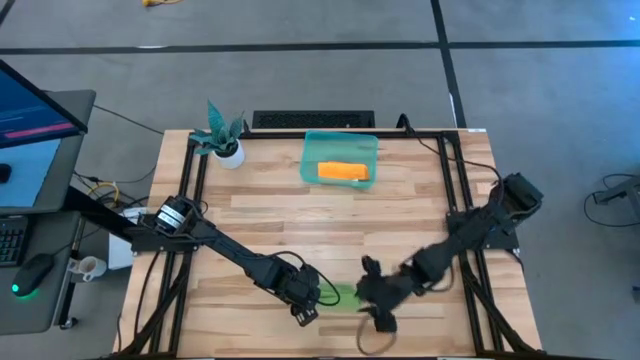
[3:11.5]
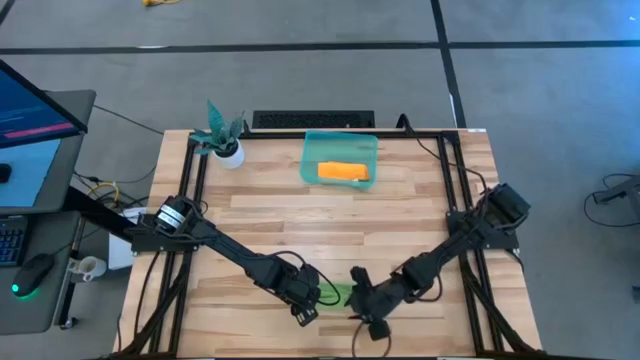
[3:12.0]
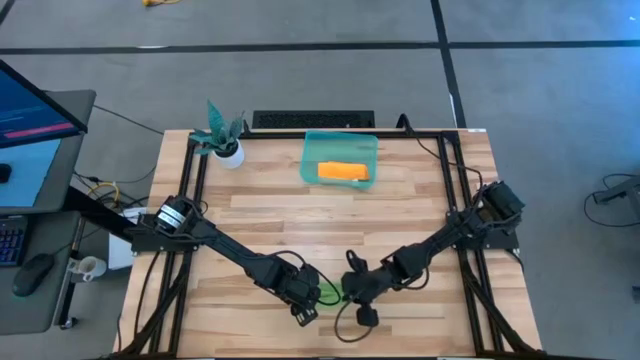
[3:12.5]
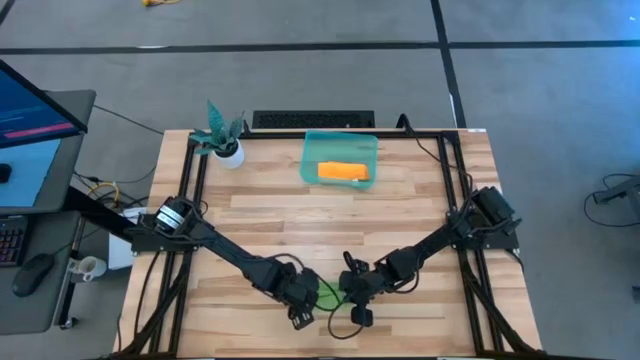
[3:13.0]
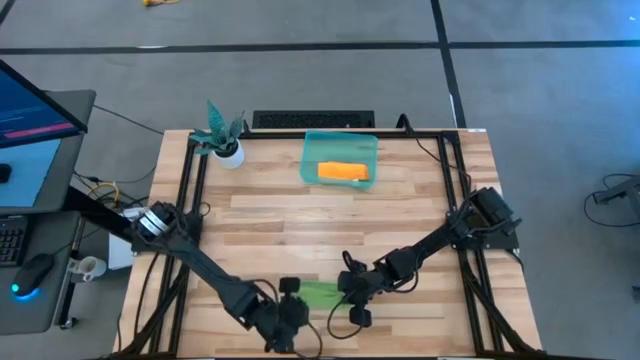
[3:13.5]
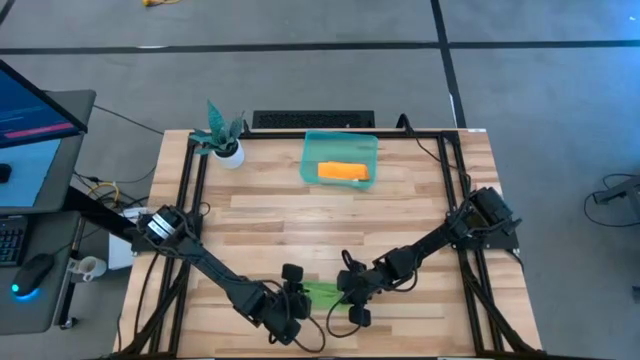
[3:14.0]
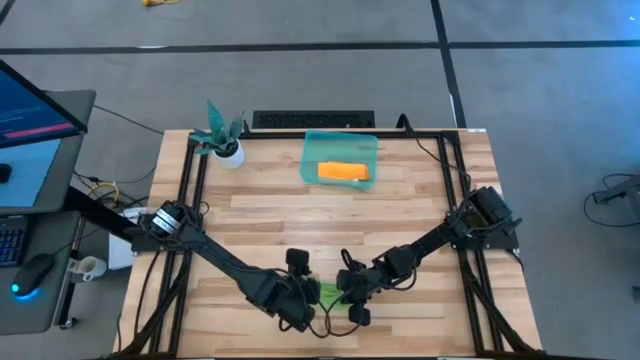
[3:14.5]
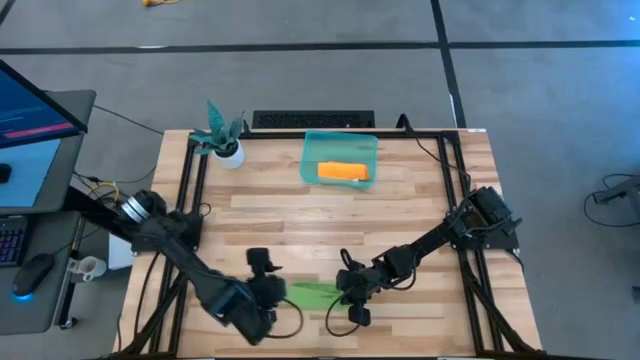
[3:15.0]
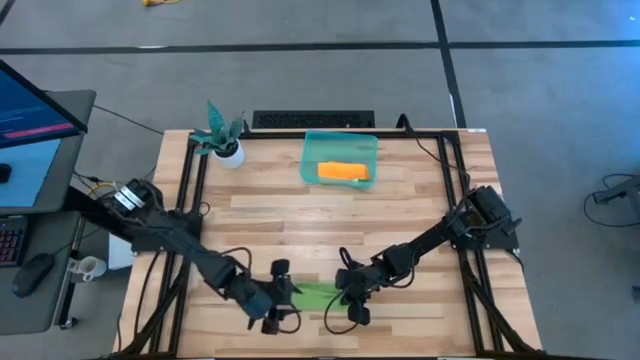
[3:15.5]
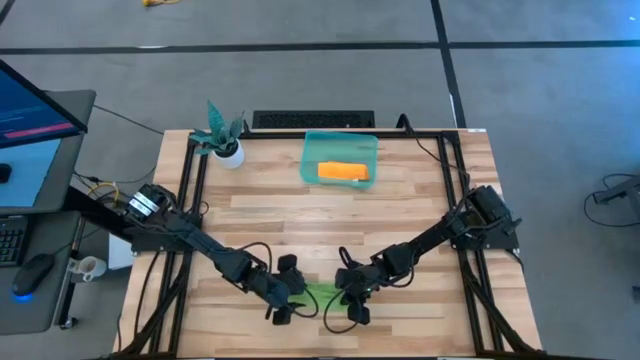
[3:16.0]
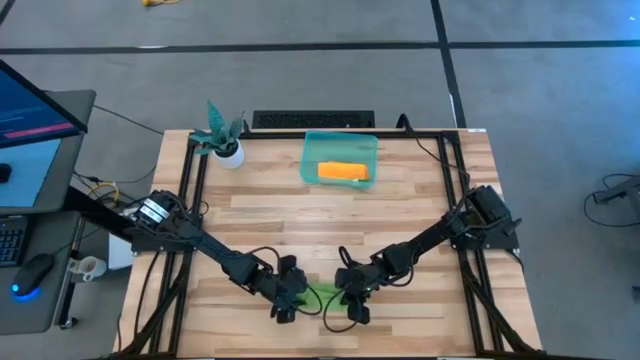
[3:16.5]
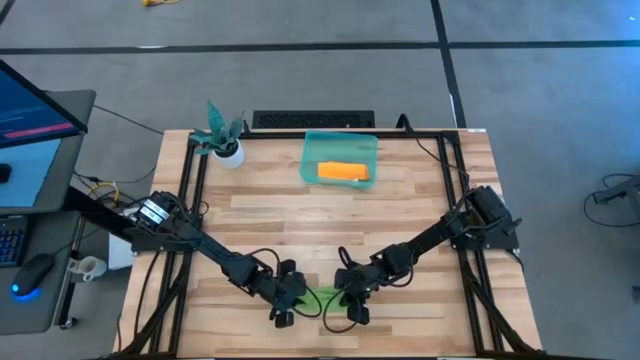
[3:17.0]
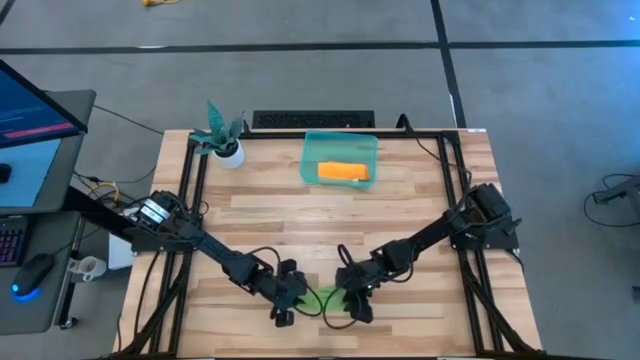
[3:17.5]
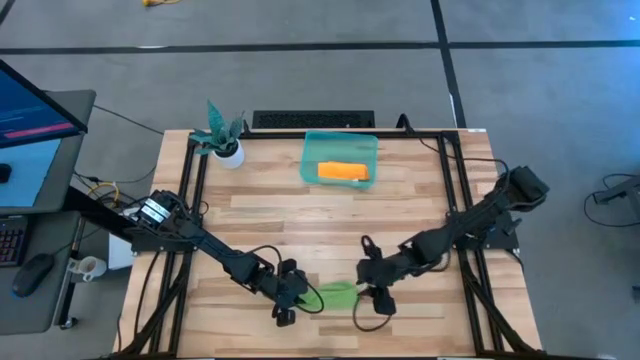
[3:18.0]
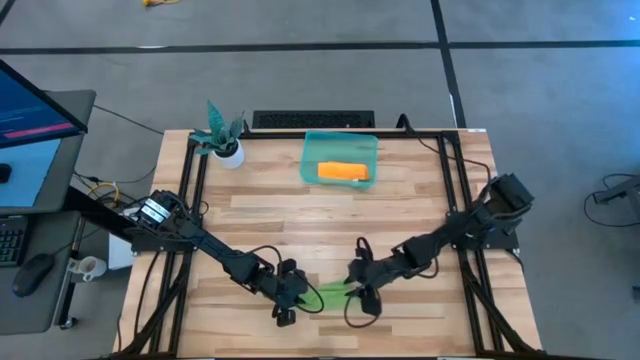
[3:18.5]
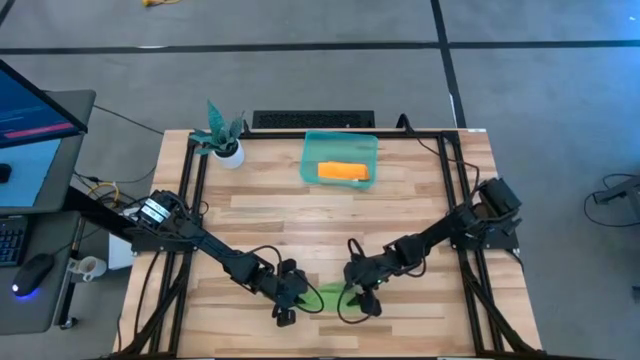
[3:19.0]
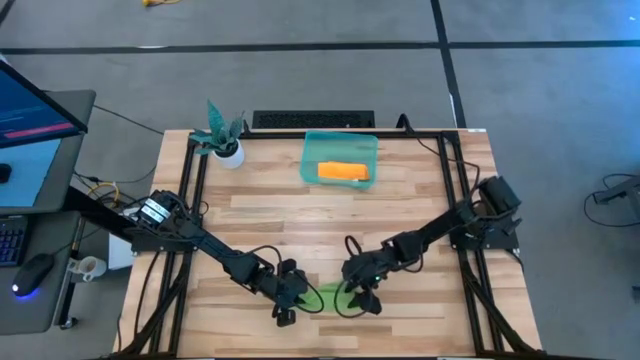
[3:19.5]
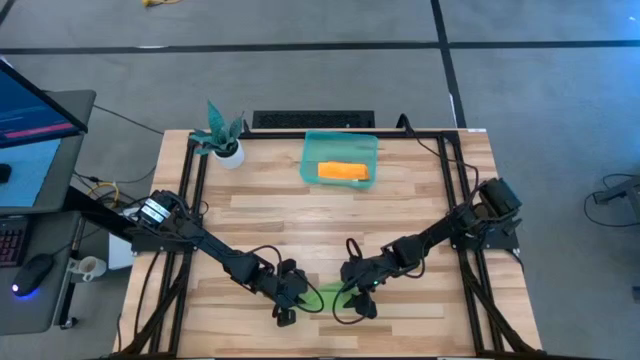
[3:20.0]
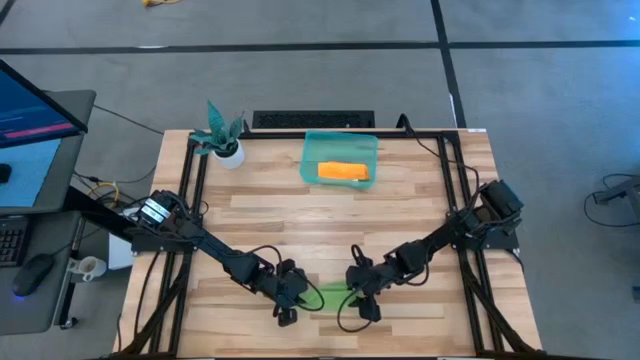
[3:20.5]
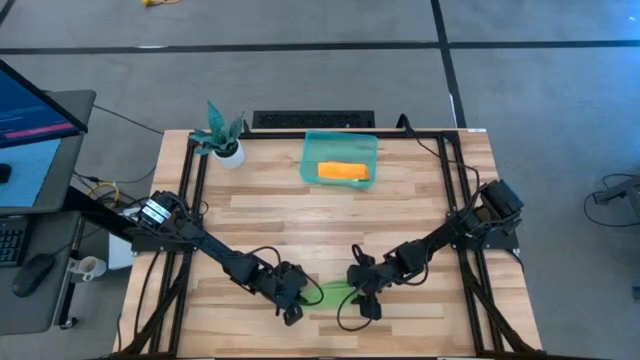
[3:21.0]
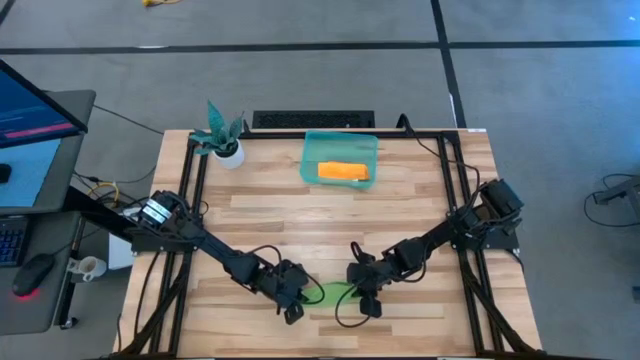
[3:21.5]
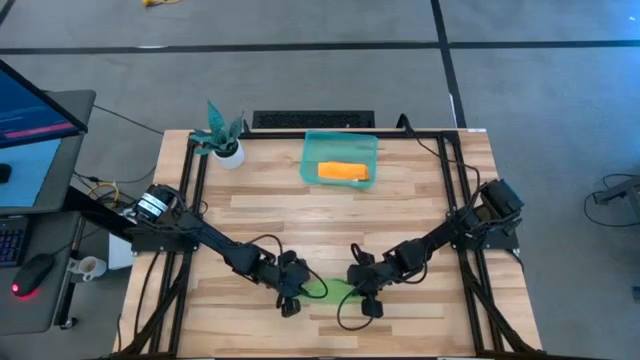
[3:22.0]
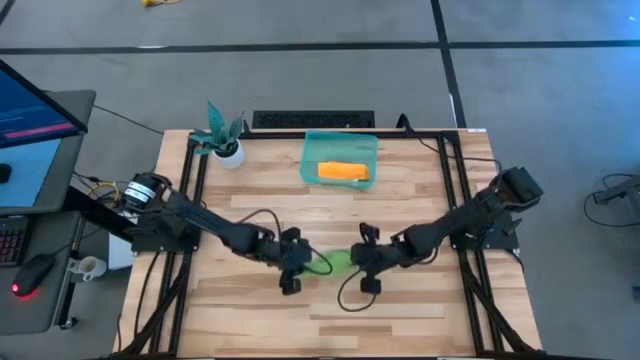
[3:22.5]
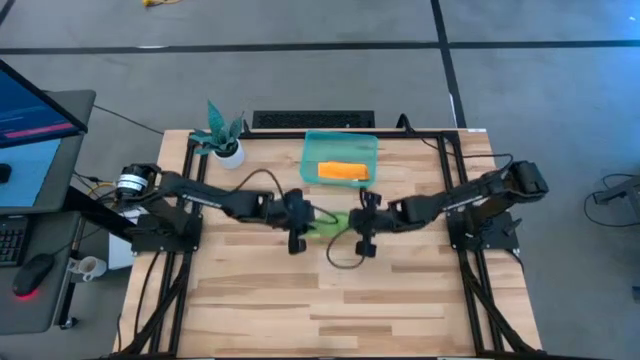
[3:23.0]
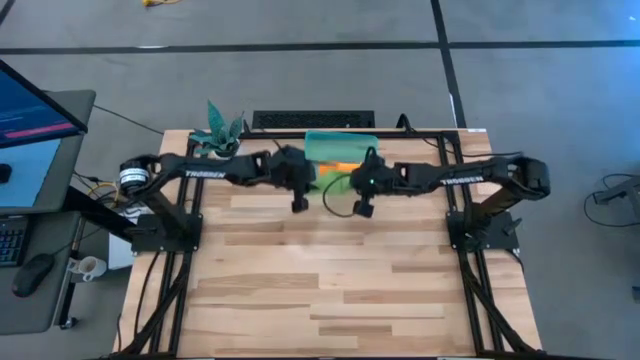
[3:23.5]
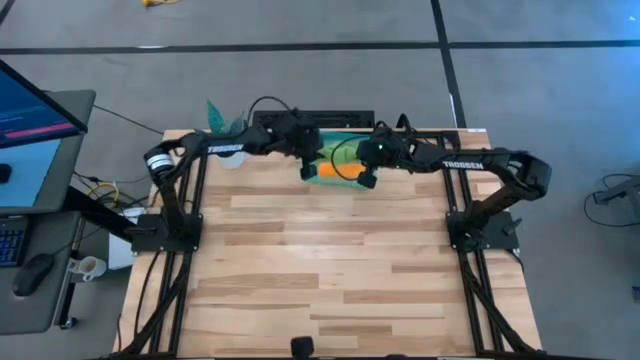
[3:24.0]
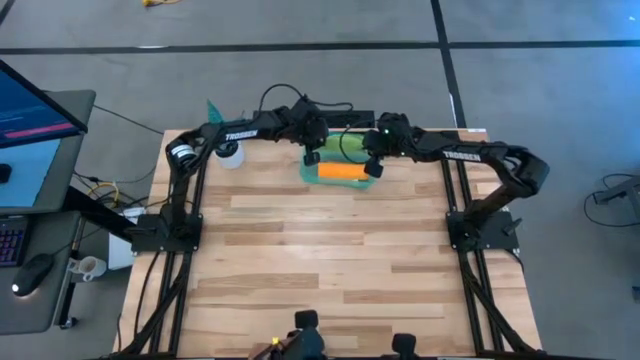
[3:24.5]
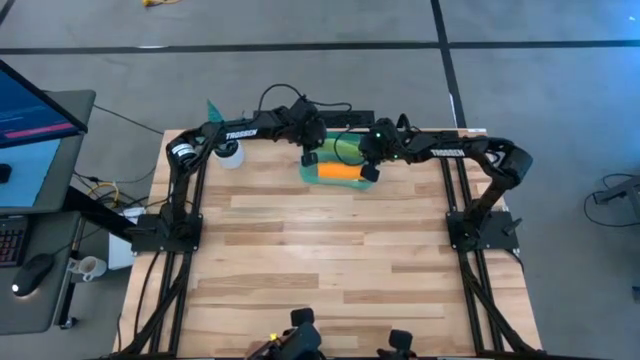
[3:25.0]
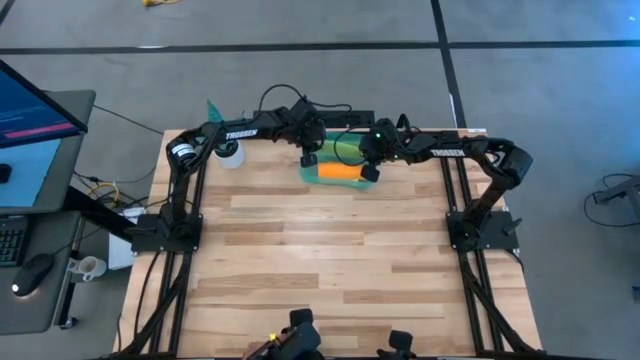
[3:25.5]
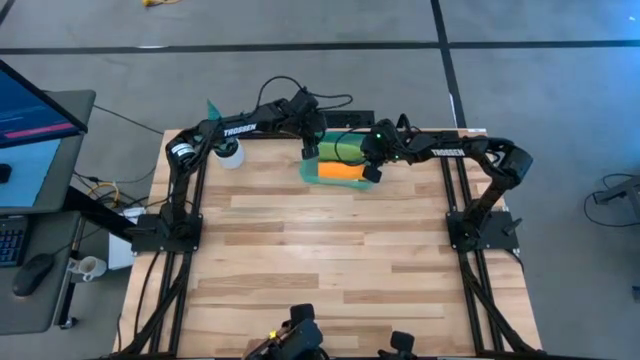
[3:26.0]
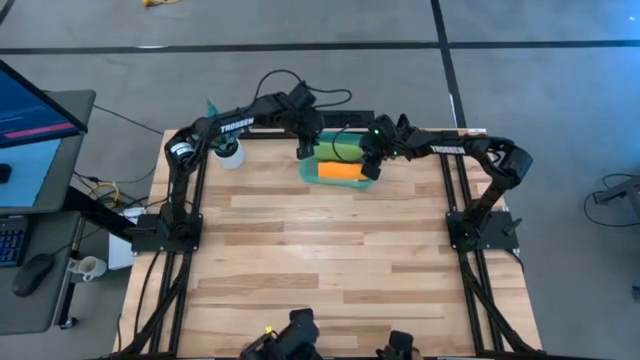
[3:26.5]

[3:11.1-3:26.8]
Task: Roll microfiber towels into tight, uniform cylinder then place into a basket
Put the green towel into the blue bin

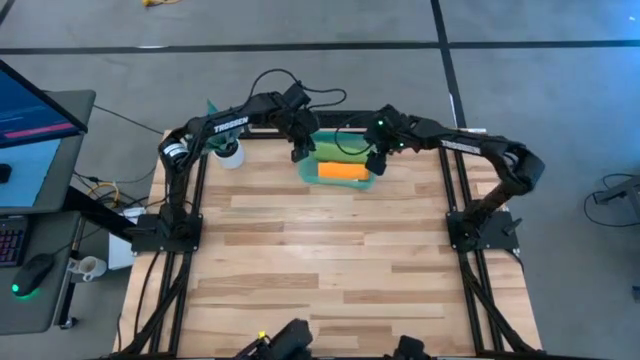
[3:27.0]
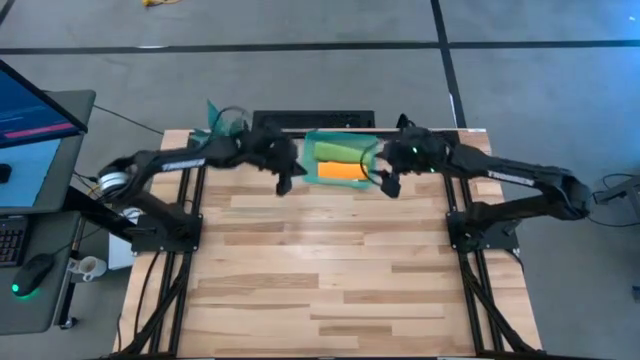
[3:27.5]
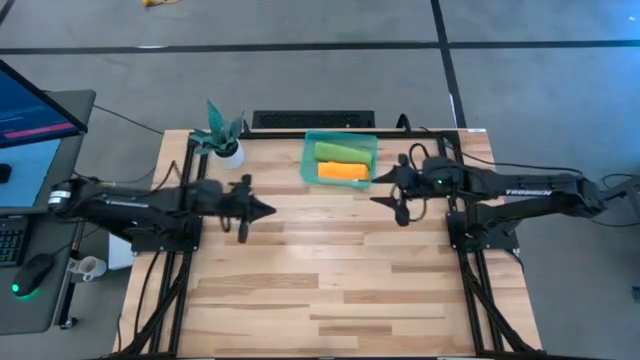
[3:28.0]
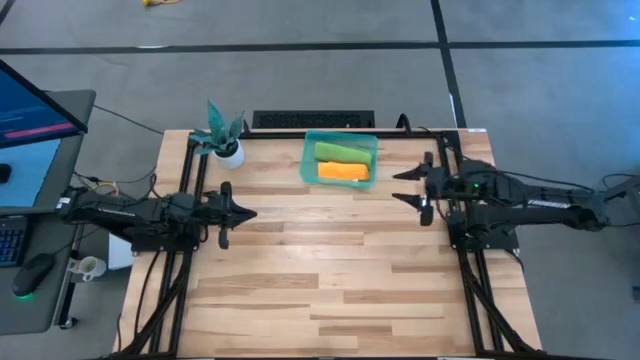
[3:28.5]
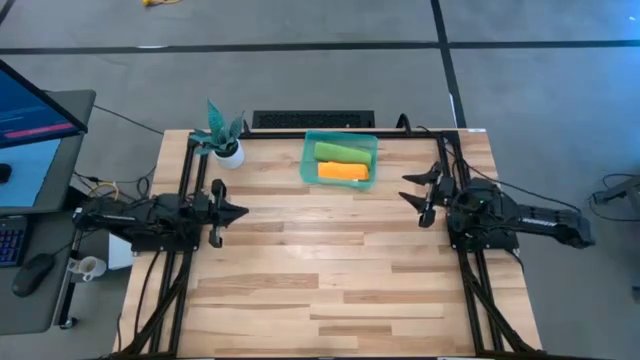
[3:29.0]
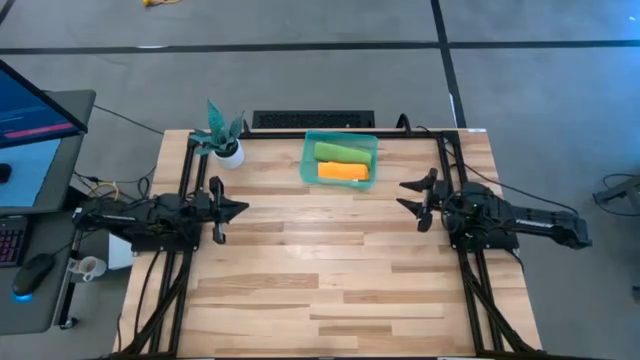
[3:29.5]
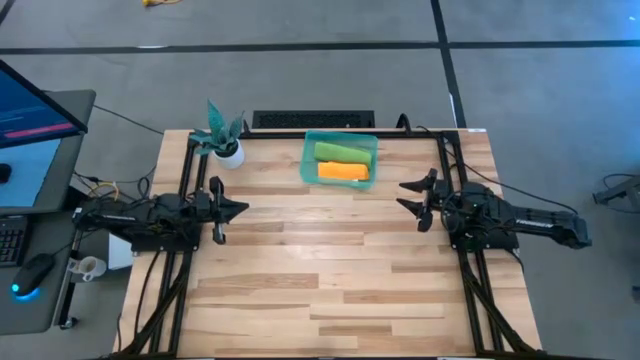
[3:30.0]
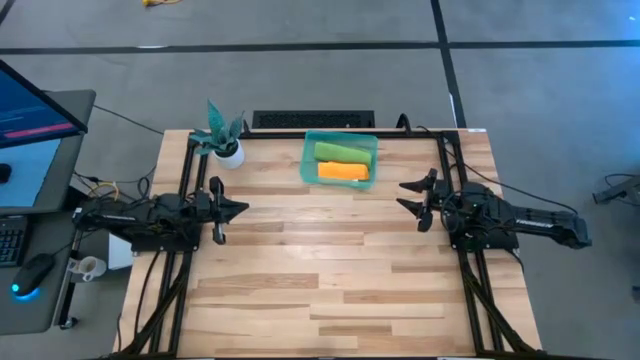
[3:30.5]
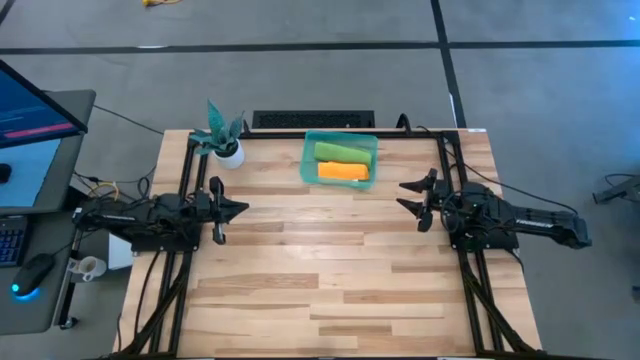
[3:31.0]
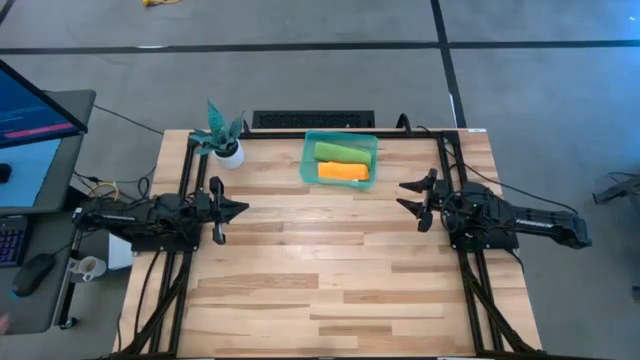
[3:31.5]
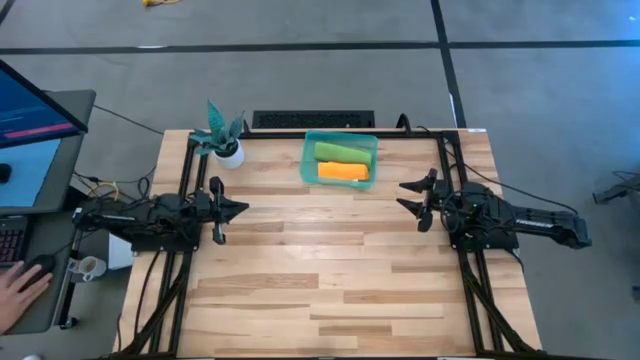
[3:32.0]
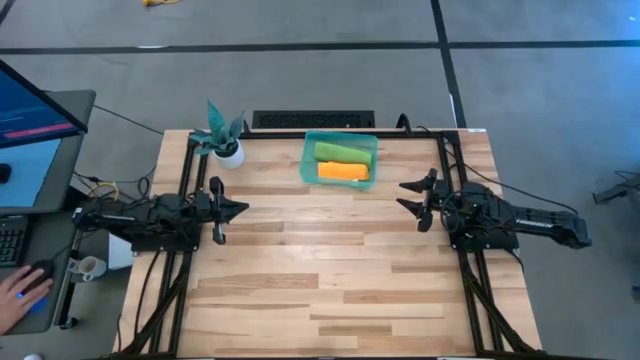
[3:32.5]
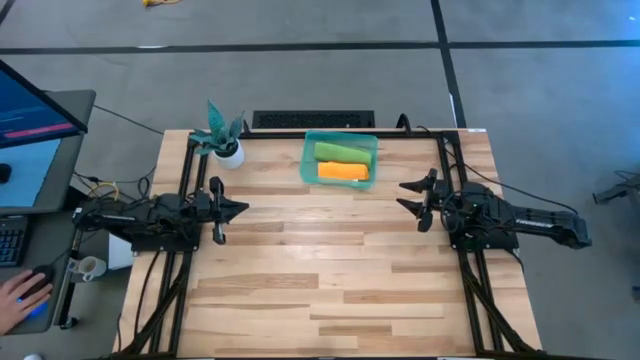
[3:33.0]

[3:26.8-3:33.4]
Return to Home Position
